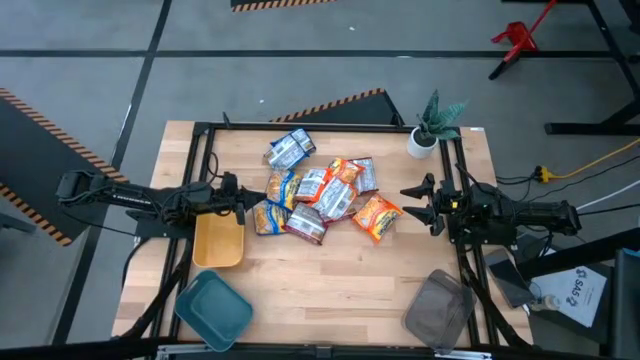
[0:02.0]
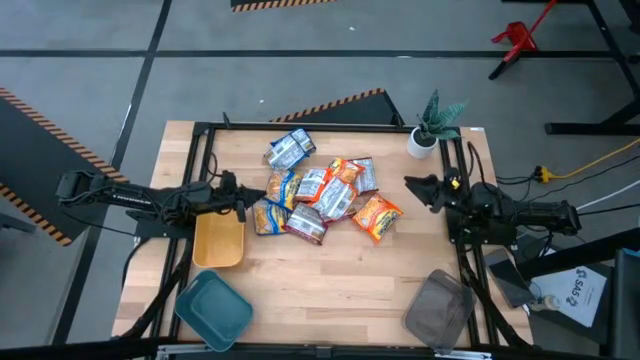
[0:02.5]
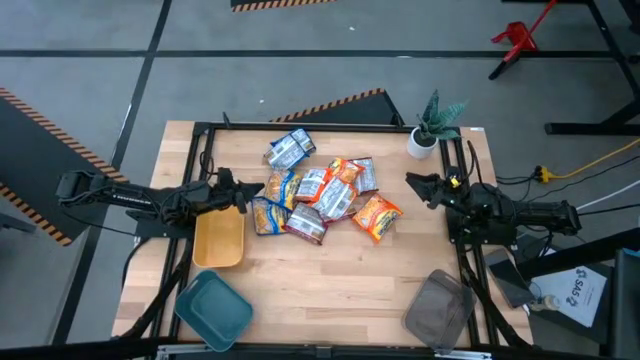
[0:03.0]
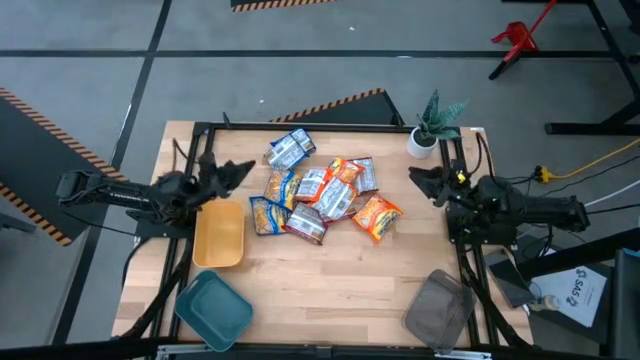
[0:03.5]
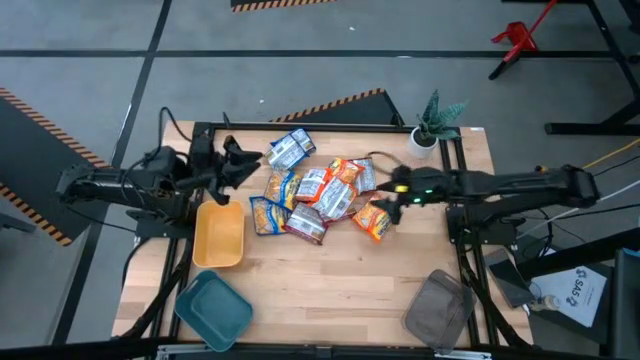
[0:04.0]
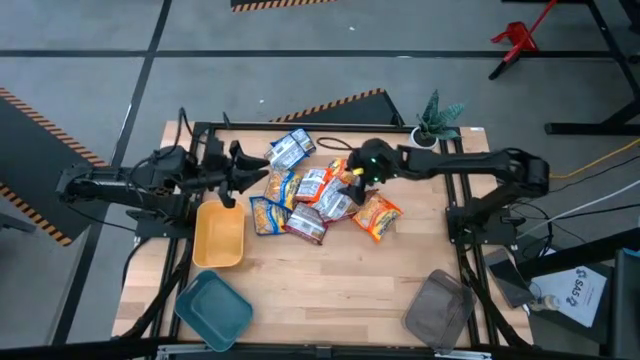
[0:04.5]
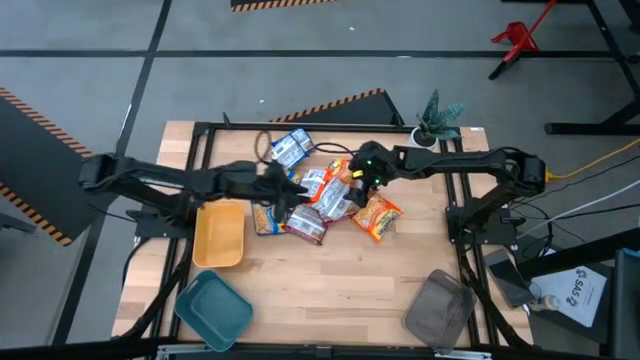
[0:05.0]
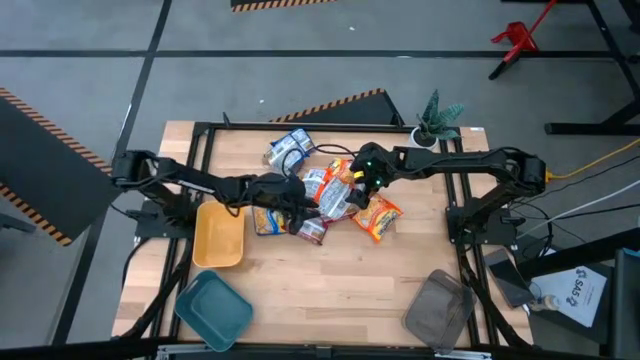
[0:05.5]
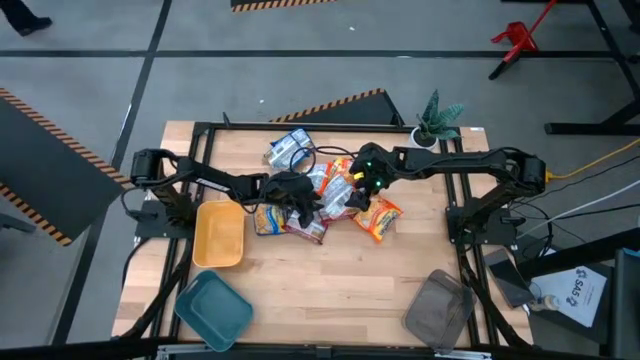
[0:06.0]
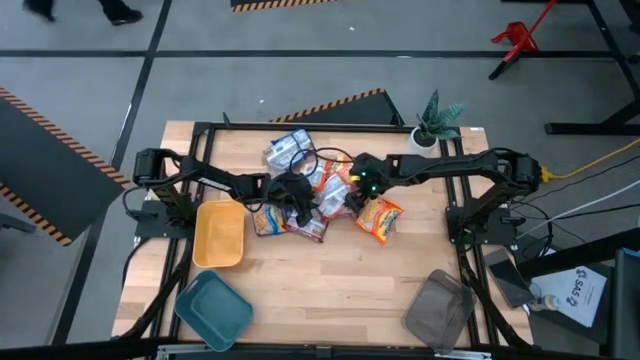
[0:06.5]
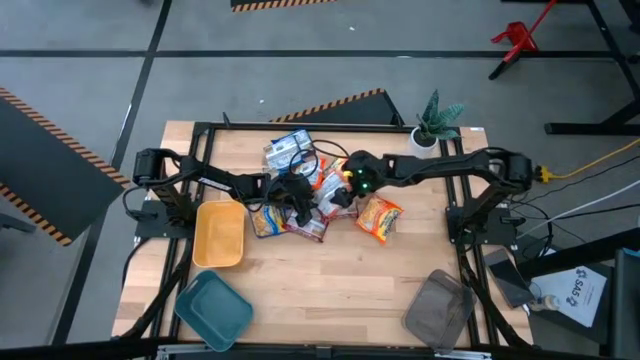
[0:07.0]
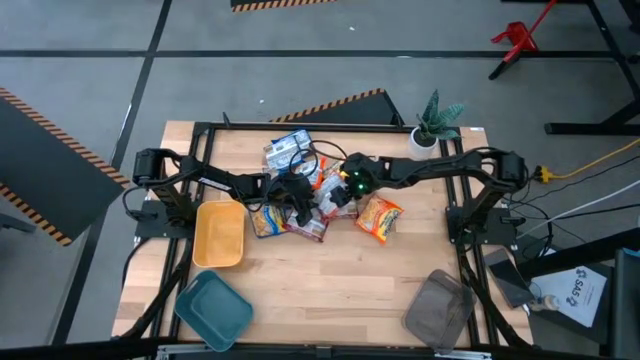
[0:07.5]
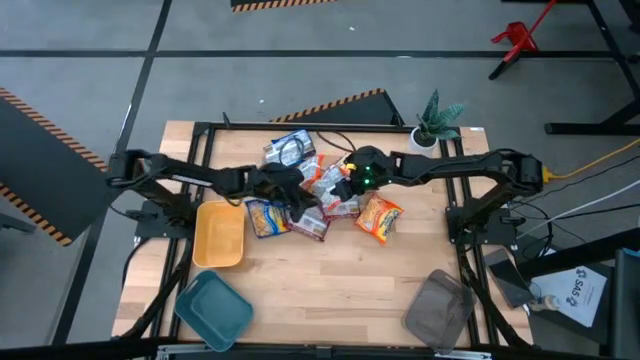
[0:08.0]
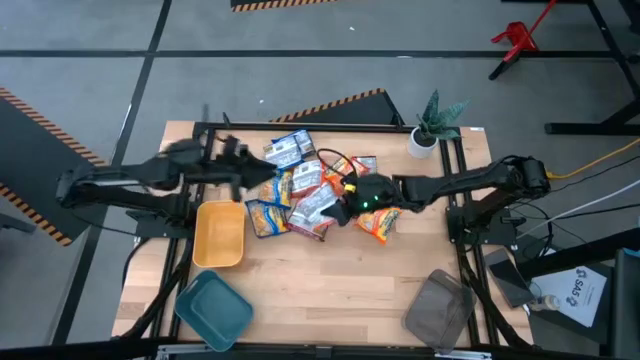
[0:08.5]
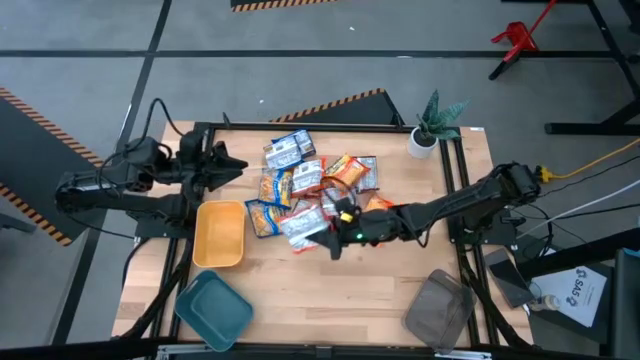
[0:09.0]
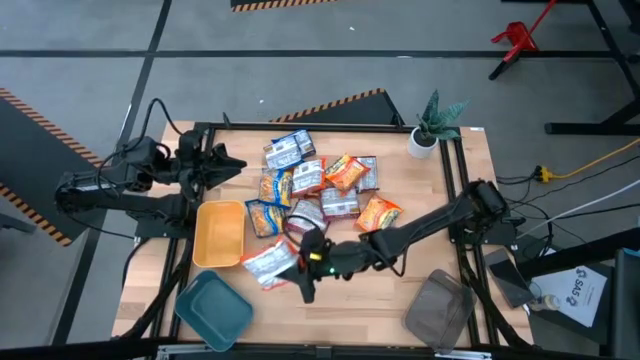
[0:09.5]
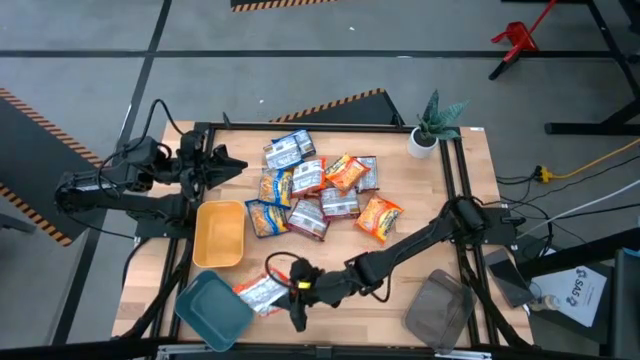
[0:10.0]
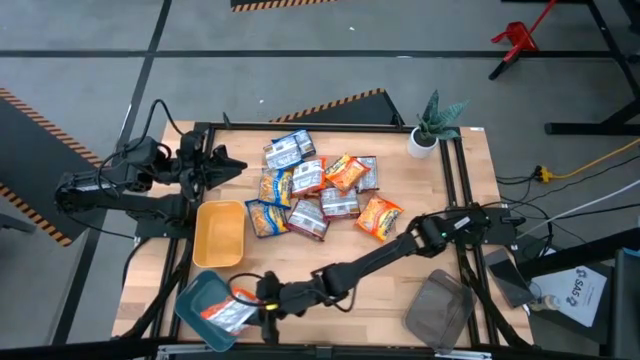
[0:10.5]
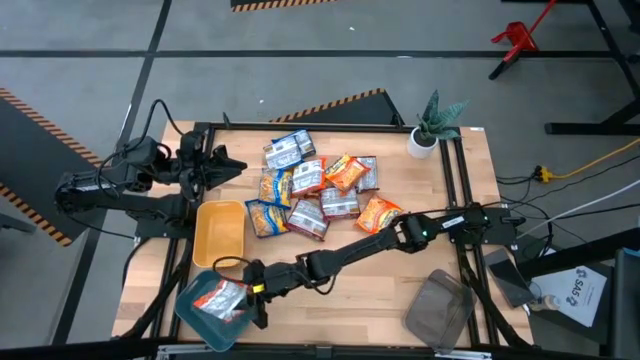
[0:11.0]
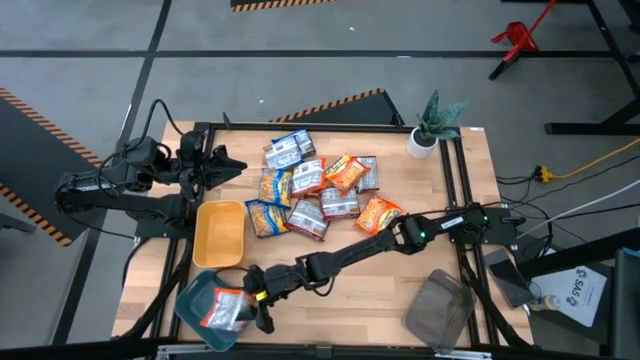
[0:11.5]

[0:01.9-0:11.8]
Task: Sort Maruchan noodles
Put the orange noodle pack into the blue bin

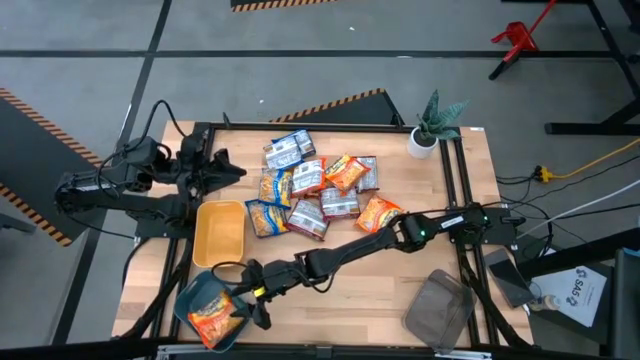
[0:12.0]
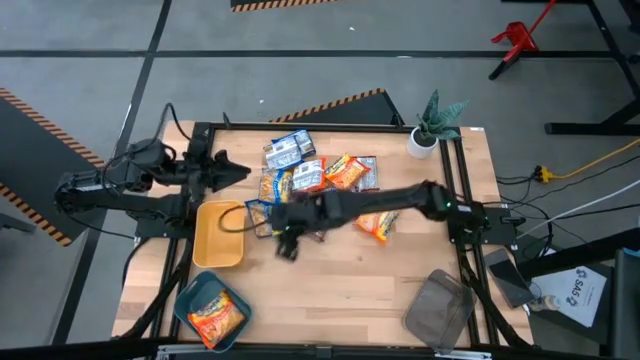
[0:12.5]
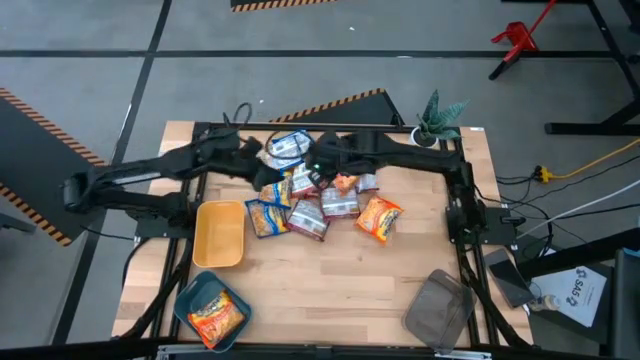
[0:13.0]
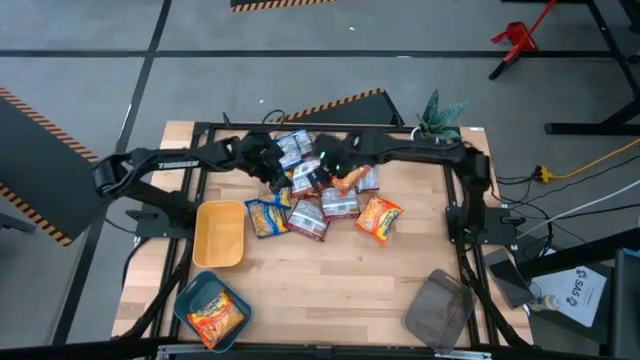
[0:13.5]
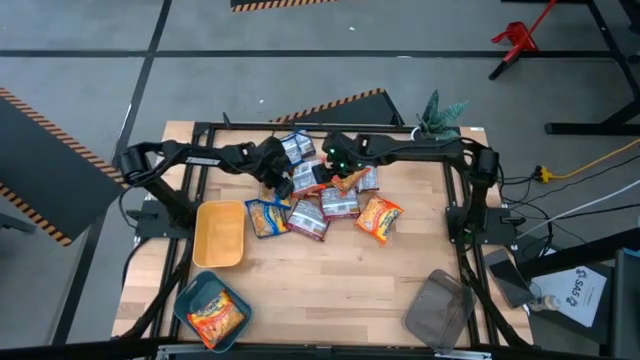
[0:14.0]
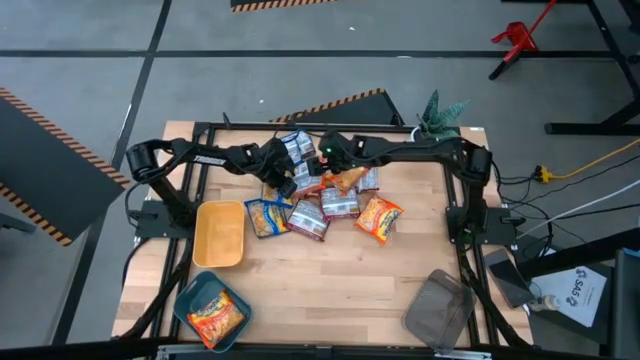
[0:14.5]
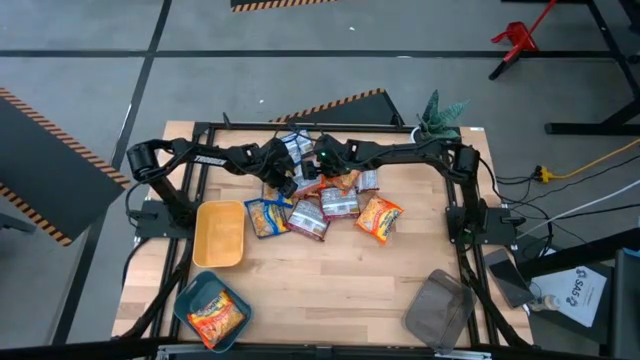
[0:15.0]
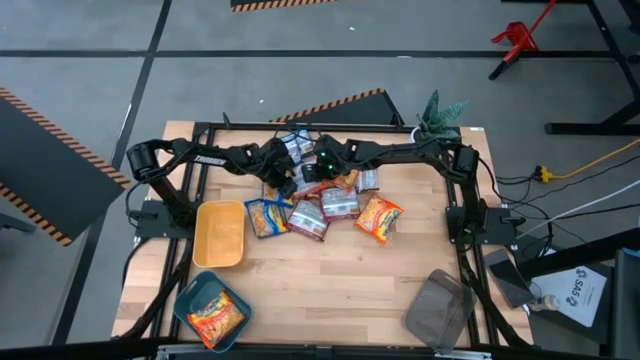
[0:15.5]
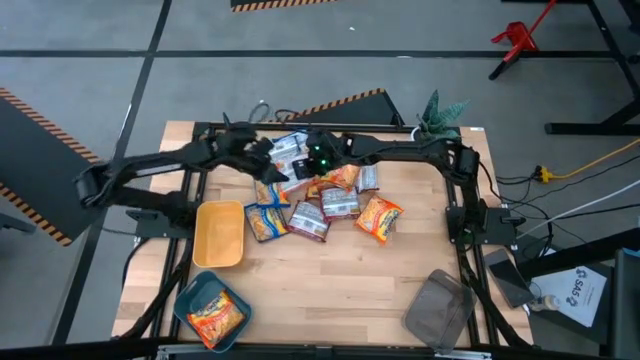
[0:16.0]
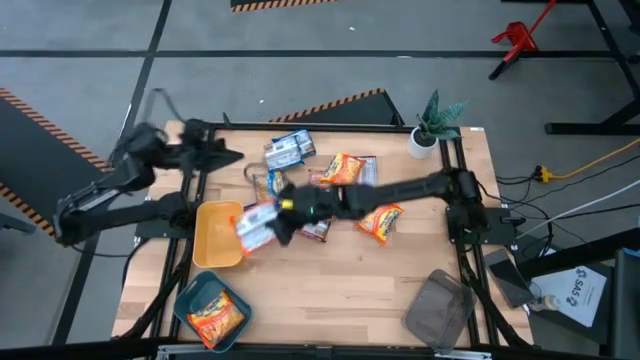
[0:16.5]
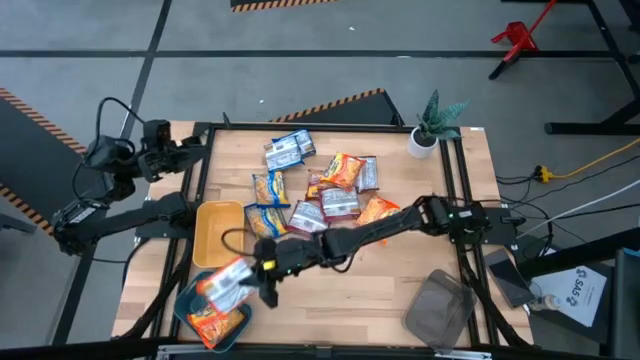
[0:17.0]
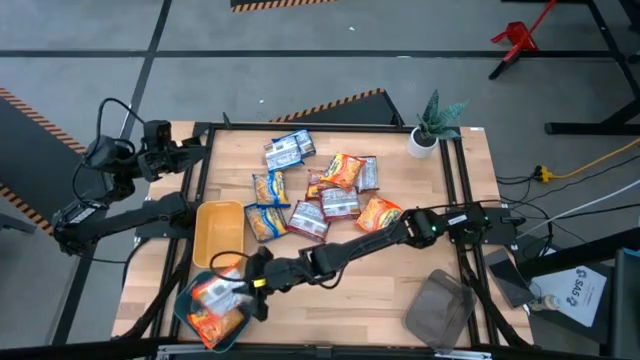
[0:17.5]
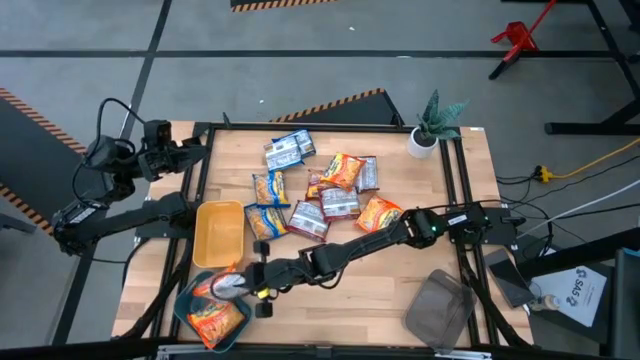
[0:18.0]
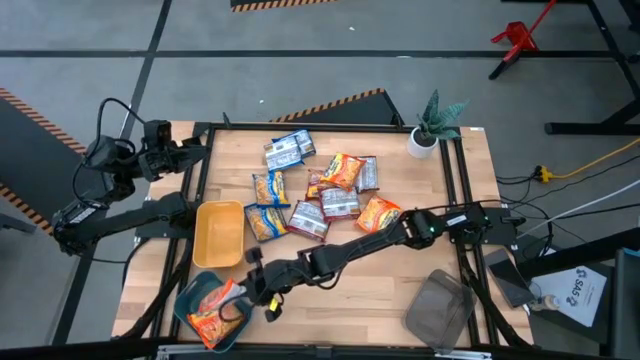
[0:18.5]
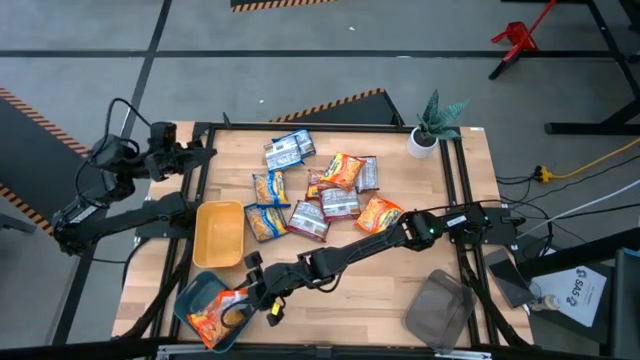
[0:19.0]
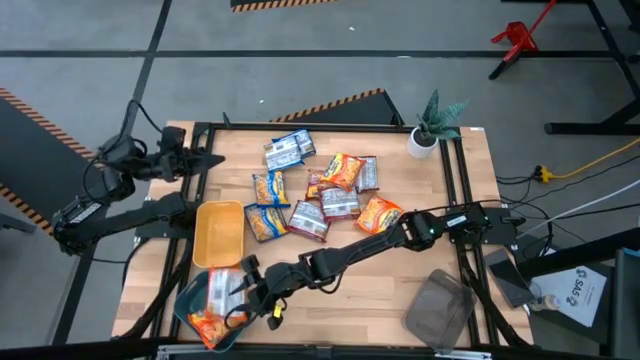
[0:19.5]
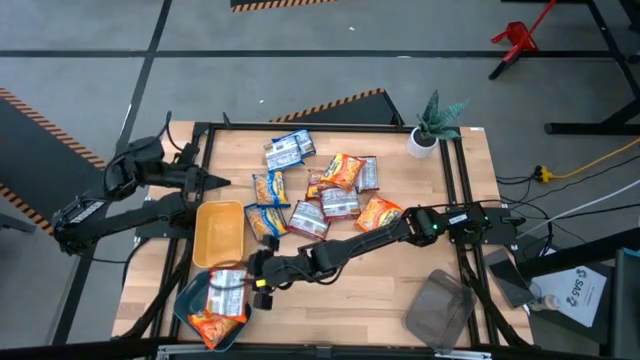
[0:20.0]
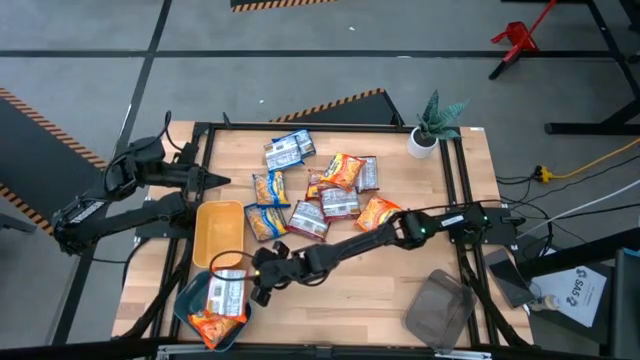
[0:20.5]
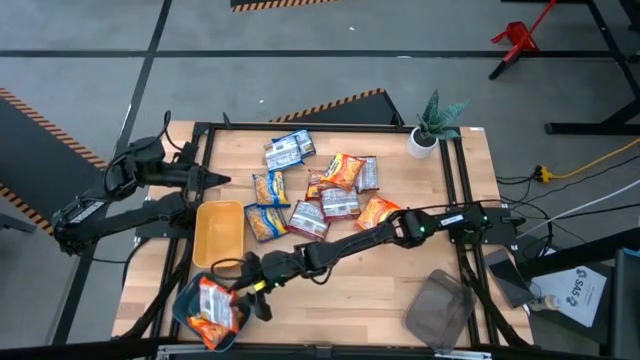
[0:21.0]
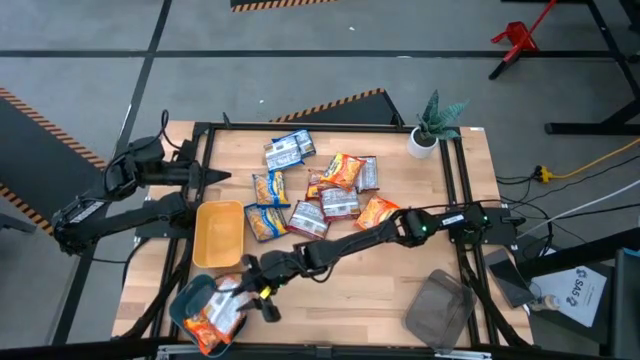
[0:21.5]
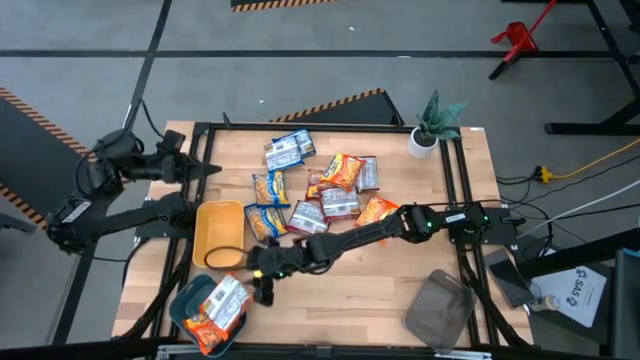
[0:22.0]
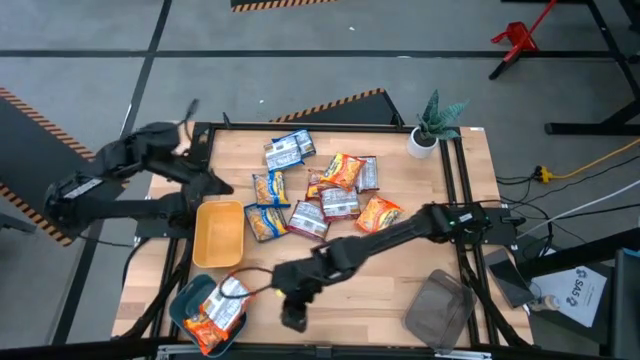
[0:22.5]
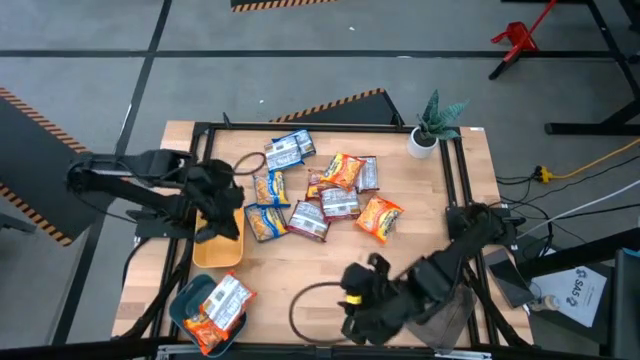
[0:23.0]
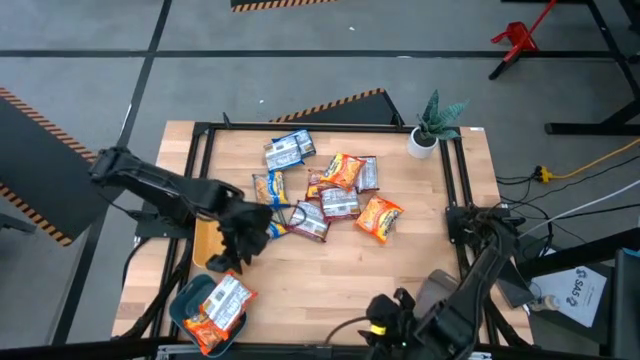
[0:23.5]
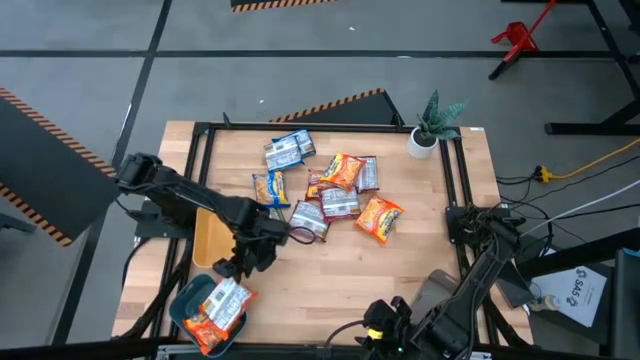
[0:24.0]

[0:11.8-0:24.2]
Put the orange noodle pack into the blue bin
